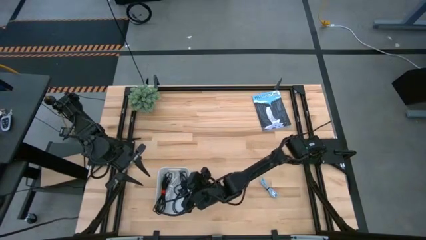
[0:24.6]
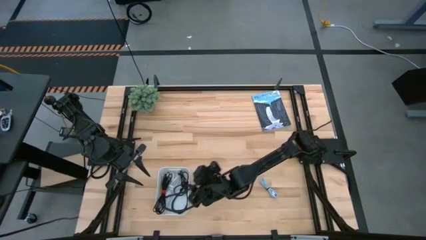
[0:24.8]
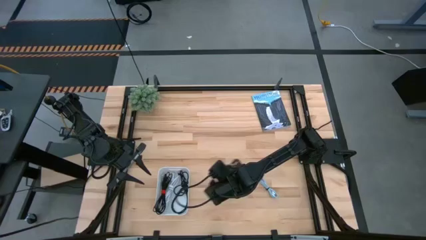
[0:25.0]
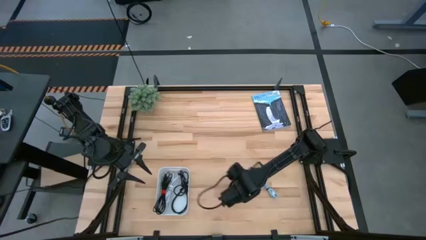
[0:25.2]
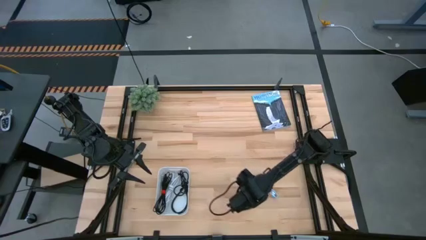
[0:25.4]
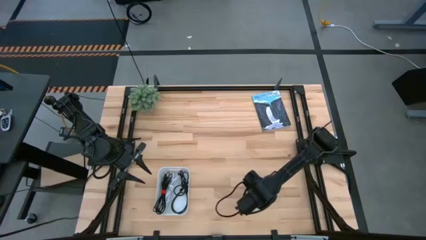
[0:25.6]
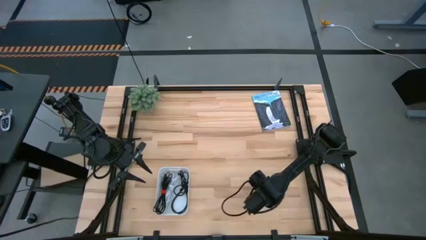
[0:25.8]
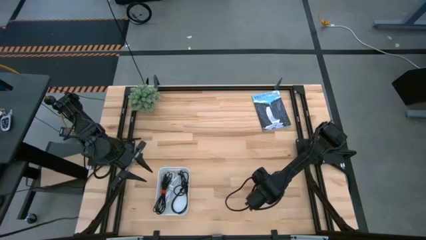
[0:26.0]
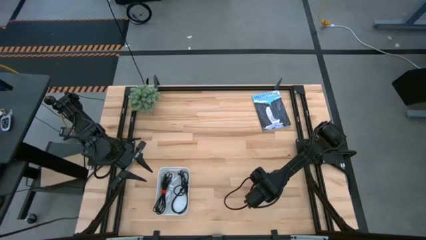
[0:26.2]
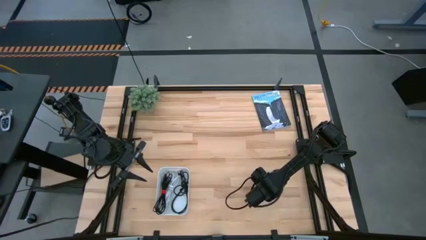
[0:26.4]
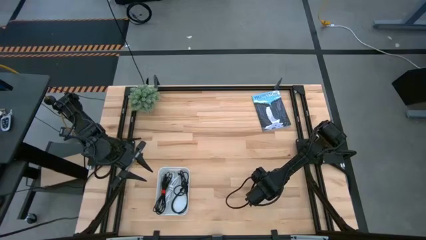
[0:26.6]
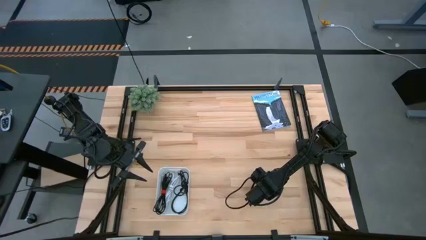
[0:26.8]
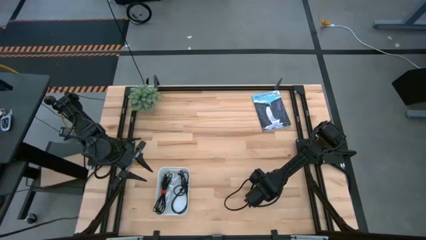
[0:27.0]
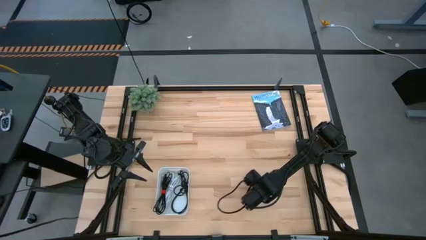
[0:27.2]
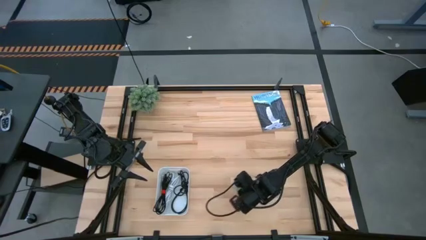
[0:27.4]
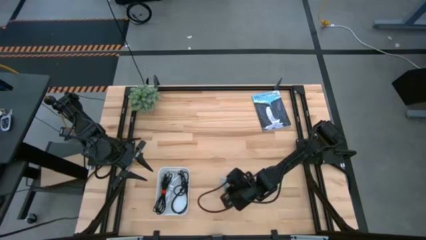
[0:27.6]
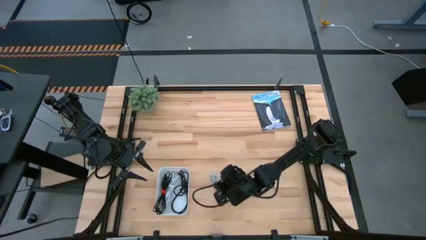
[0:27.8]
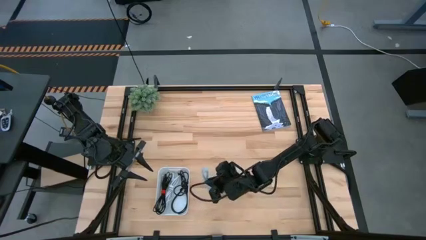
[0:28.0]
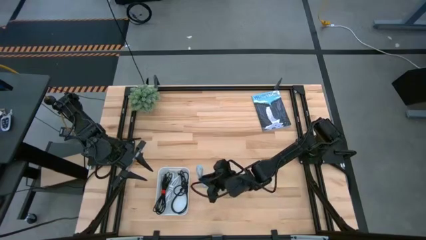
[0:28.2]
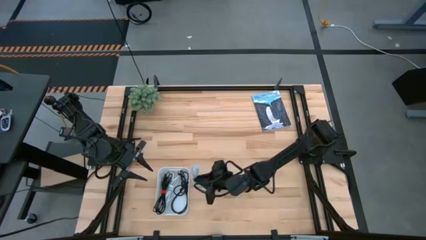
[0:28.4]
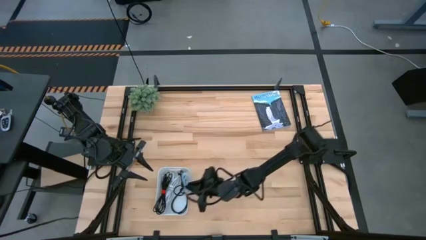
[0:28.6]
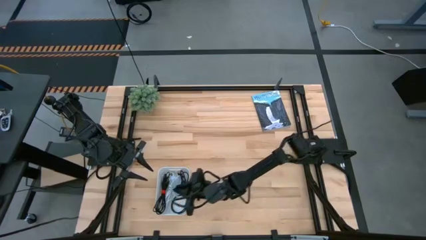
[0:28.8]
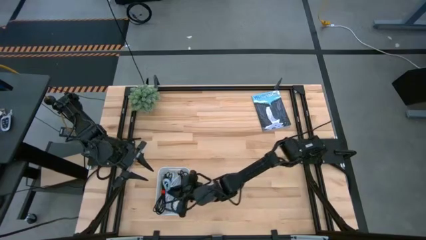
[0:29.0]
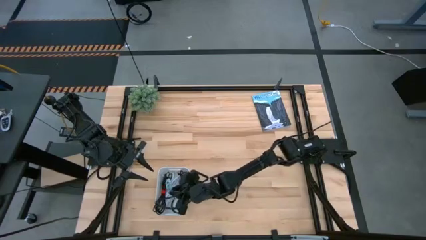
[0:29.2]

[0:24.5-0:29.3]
Task: Pick and place USB-C Cables
Put the gray charger cable into the white bin

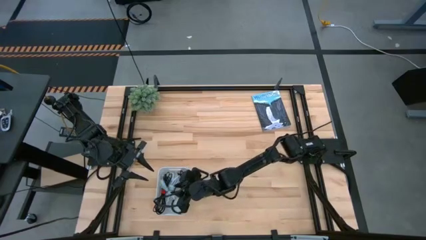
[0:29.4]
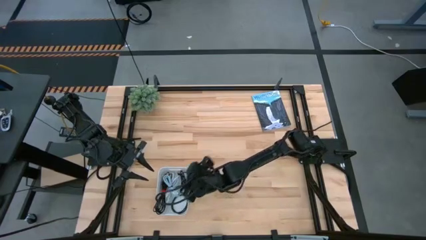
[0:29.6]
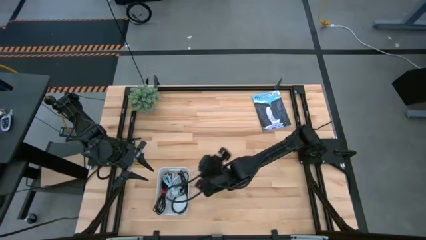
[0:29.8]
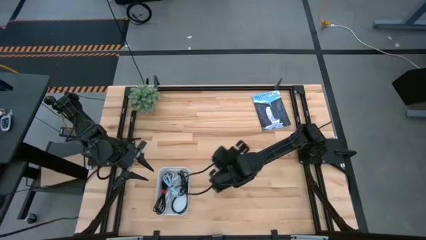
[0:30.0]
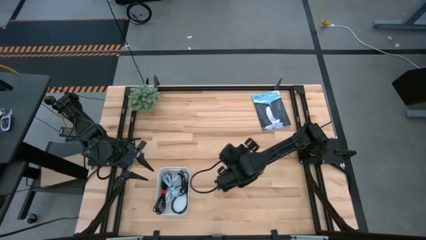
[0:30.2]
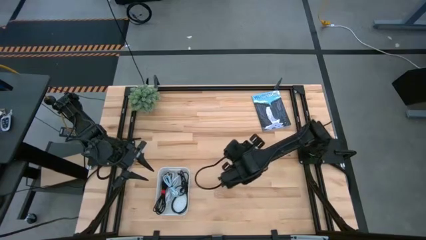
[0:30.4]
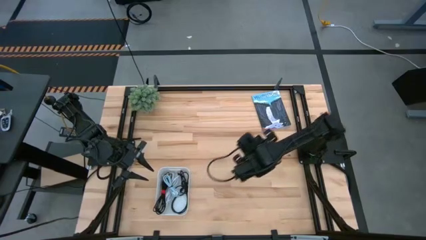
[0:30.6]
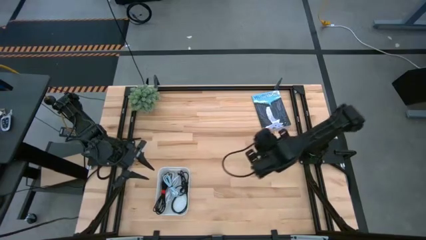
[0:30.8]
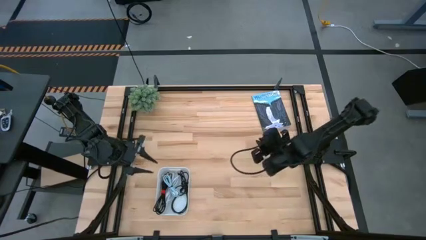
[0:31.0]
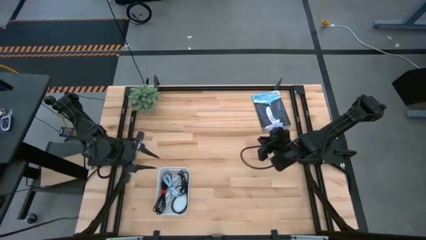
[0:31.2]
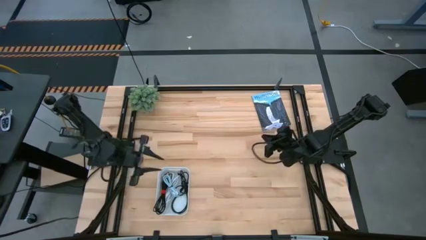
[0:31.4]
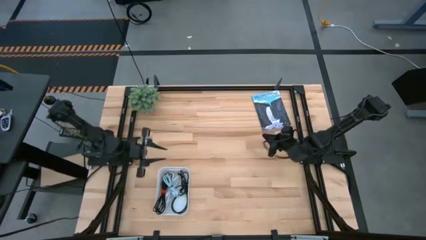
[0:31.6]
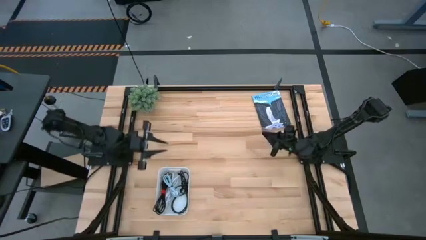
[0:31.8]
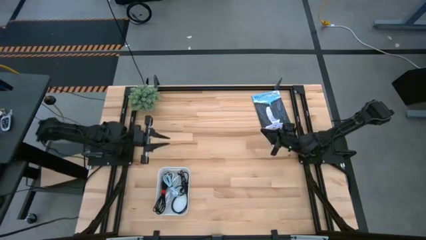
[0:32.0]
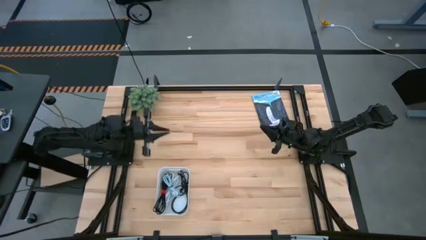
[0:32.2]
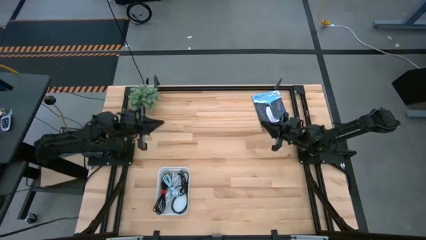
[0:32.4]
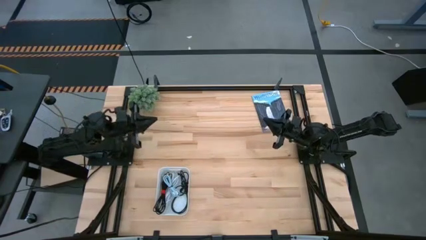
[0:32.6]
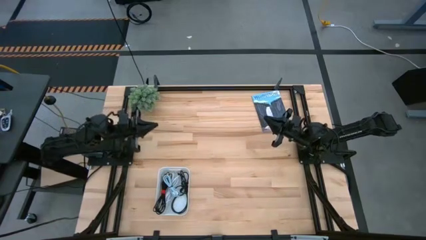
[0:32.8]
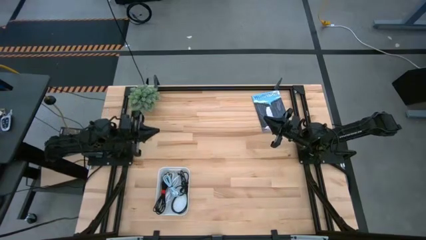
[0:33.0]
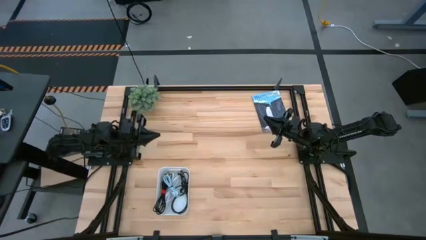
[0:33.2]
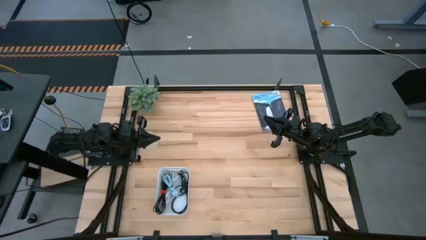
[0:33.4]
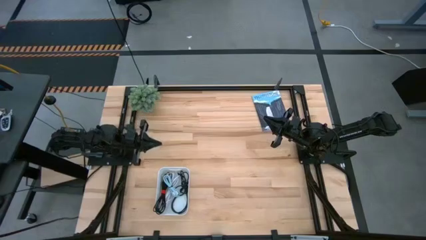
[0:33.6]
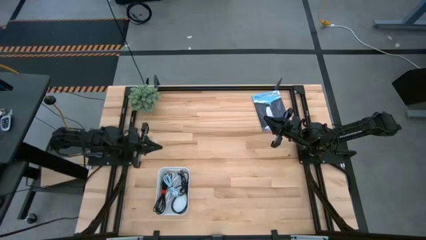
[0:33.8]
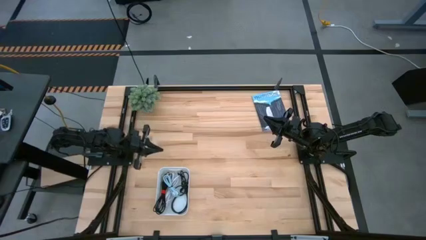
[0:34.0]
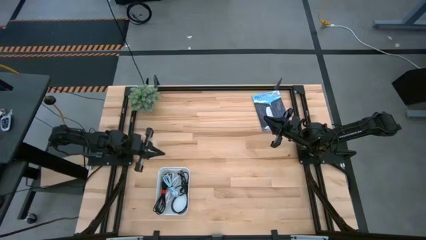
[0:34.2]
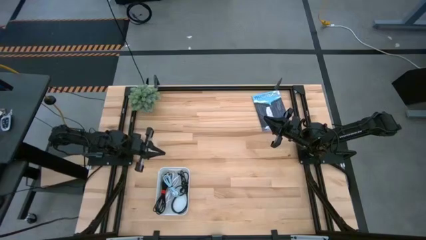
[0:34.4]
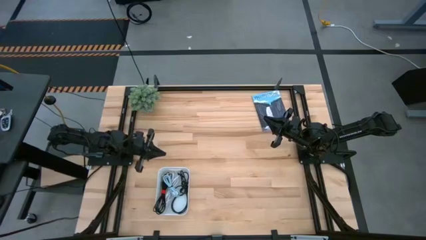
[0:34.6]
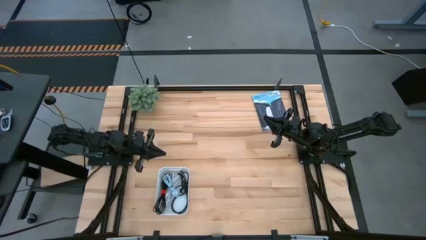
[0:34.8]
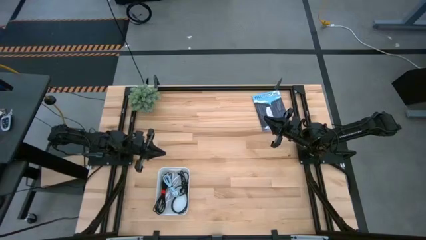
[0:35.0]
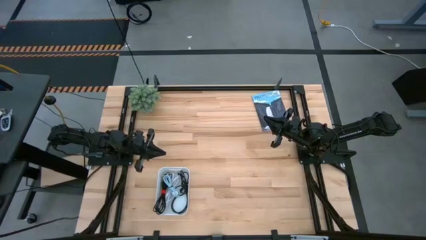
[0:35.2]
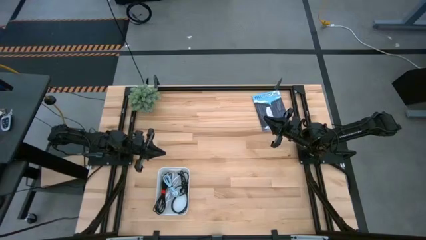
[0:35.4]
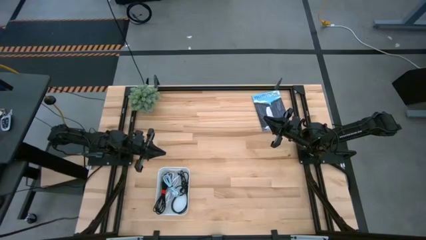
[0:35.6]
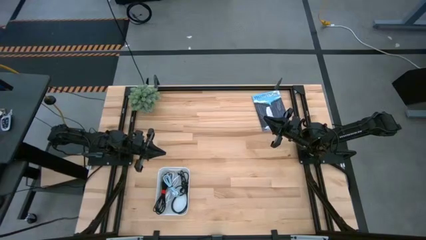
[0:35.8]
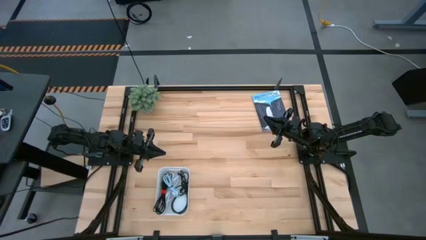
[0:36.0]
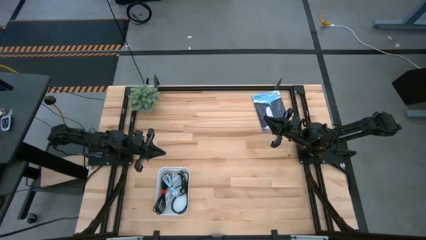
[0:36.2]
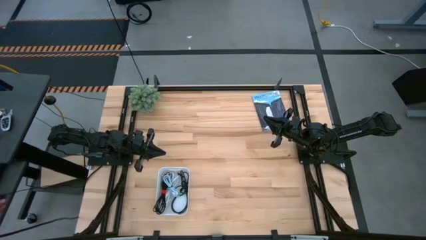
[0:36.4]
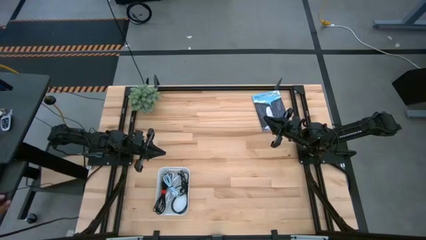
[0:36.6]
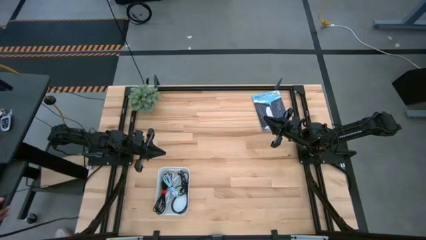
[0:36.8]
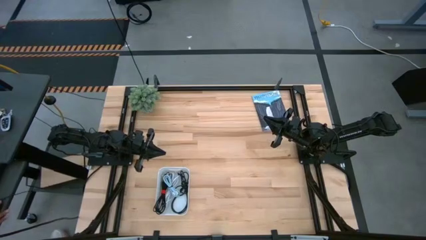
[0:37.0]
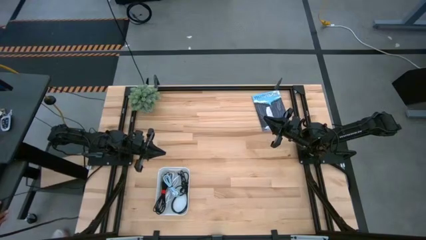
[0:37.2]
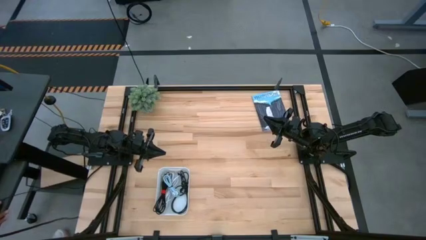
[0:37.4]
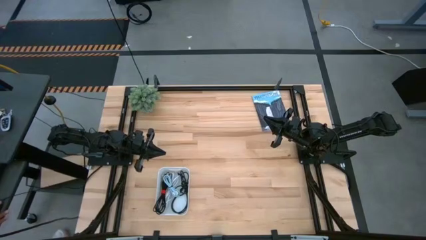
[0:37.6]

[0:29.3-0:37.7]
Return to Home Position

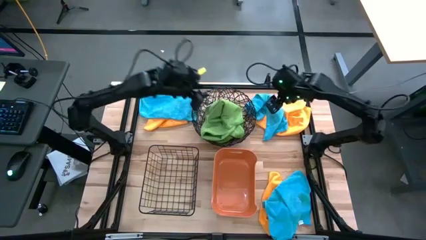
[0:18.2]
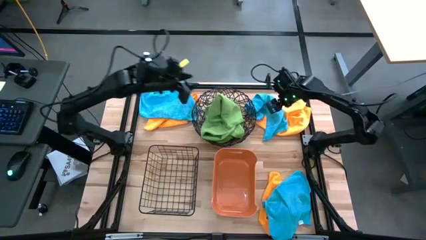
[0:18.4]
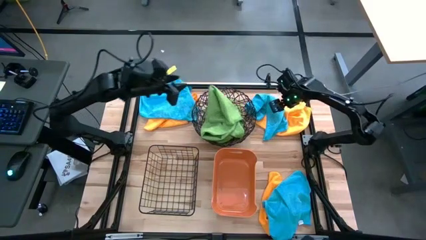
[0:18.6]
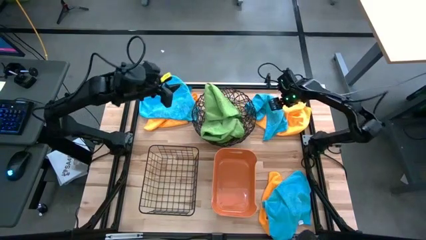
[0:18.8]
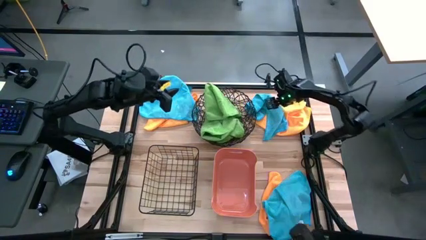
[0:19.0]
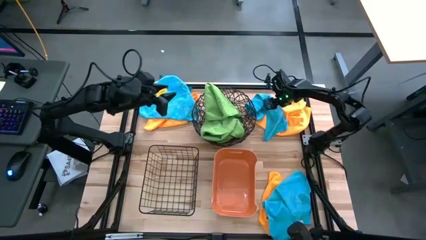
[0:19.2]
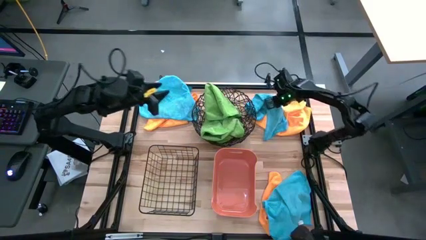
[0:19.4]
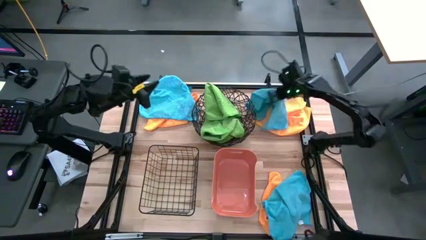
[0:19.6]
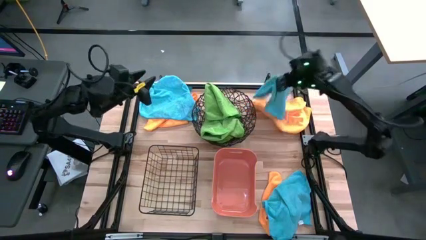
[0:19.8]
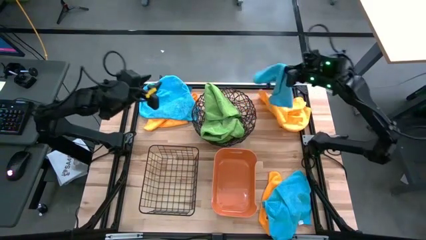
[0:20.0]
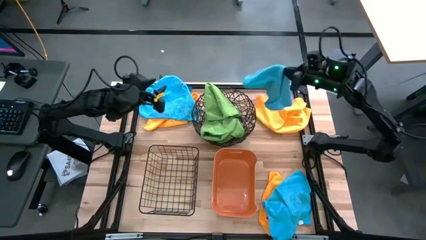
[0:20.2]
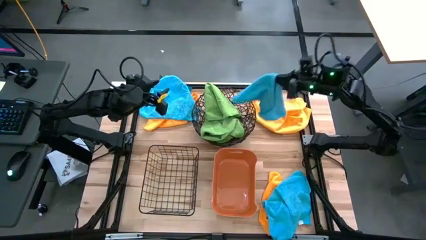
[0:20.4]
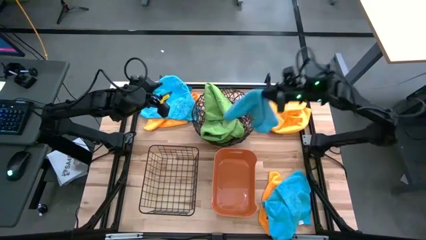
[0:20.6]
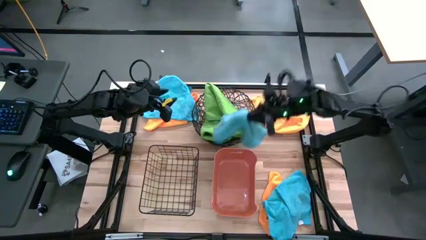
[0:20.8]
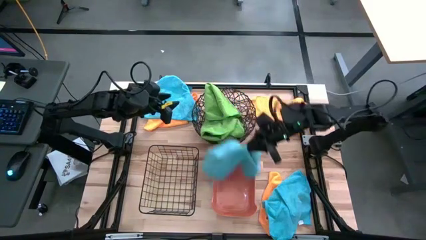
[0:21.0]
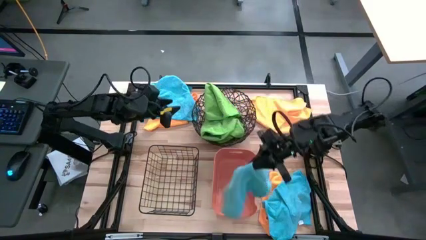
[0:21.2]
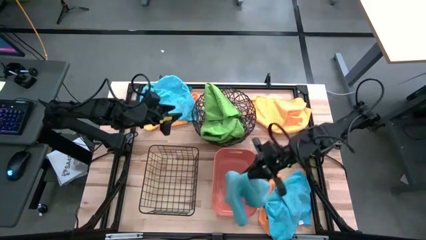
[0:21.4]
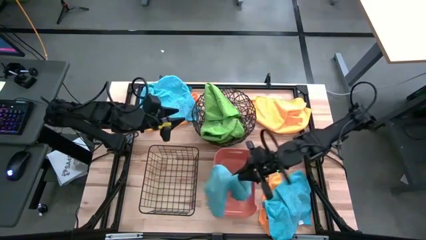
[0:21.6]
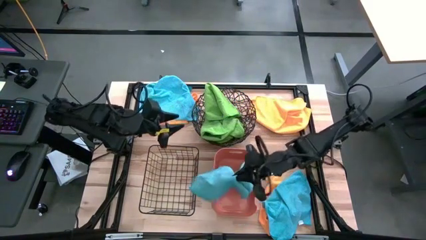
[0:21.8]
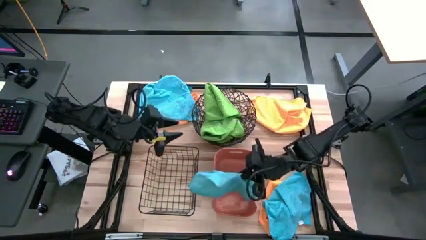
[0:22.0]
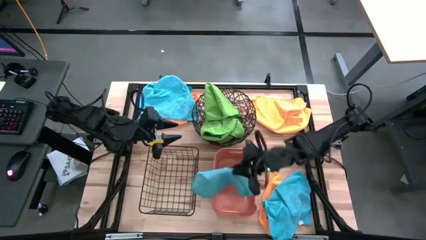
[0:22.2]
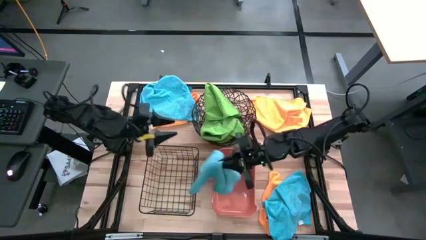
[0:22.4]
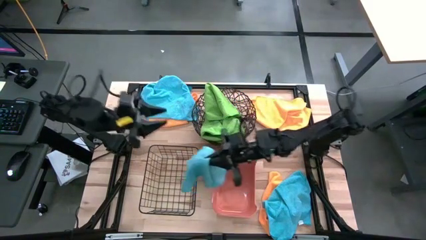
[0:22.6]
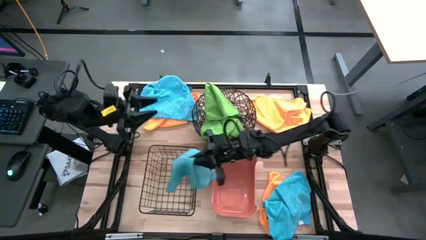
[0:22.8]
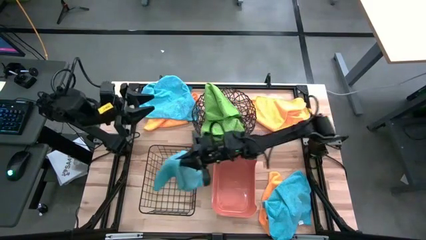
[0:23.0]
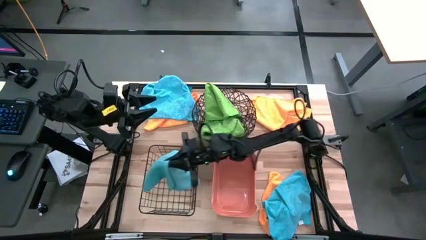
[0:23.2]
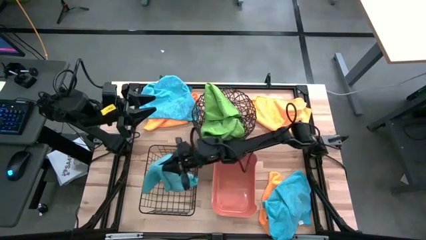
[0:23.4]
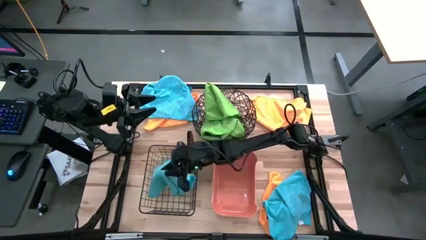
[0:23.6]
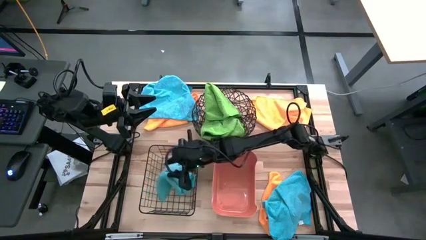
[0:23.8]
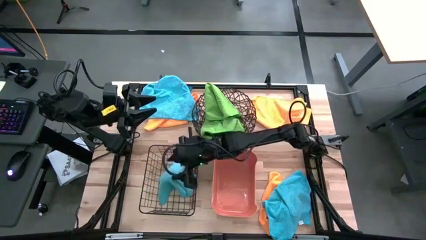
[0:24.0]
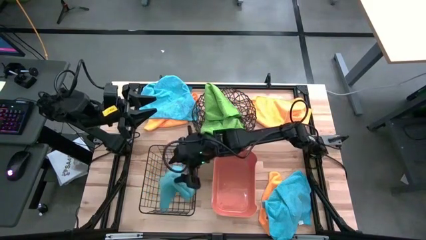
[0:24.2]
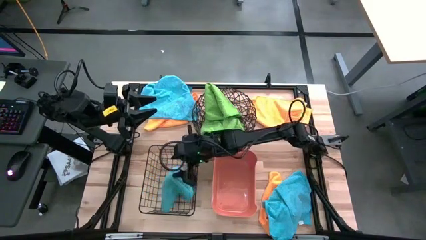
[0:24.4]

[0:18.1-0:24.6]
Task: Sort microfiber towel by color & place in baskets
Put the top right blue microfiber towel into the black wire basket
